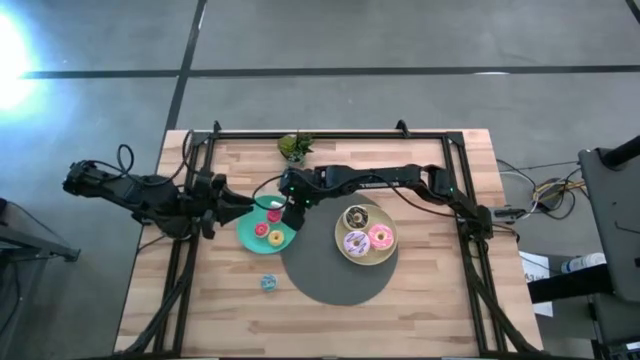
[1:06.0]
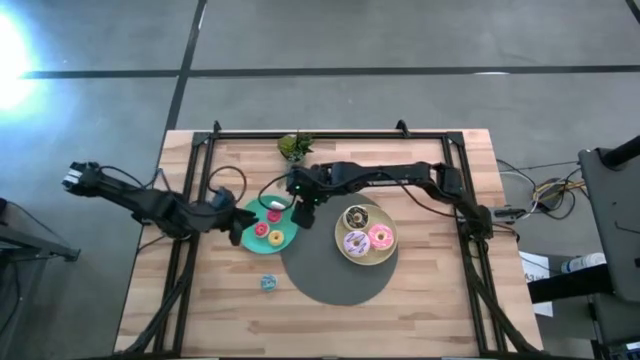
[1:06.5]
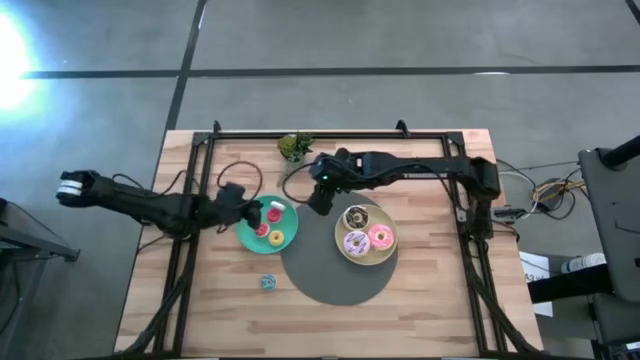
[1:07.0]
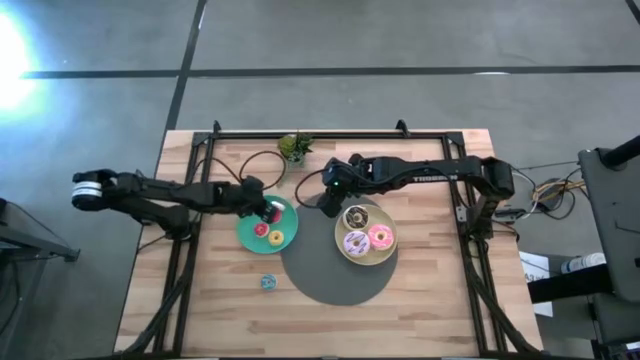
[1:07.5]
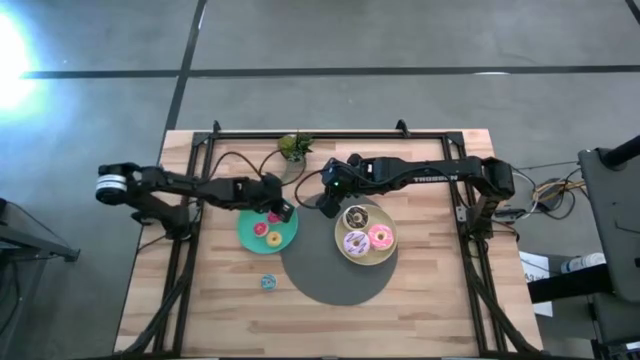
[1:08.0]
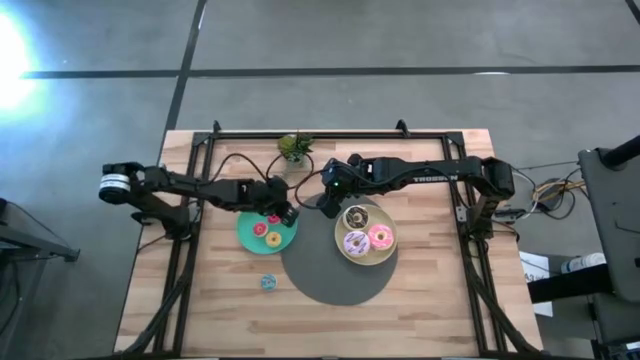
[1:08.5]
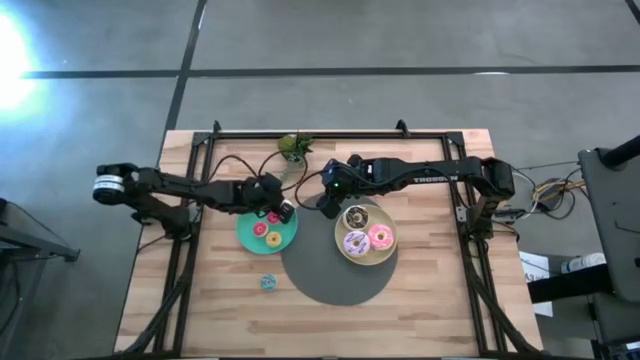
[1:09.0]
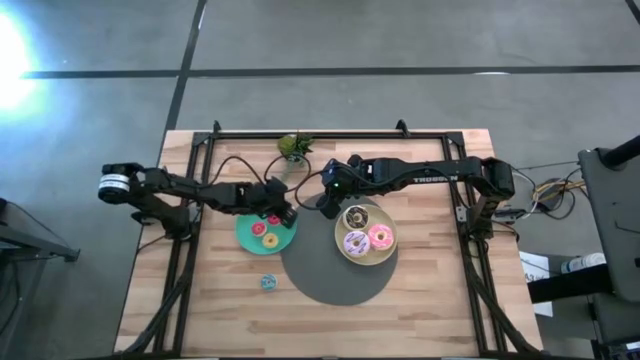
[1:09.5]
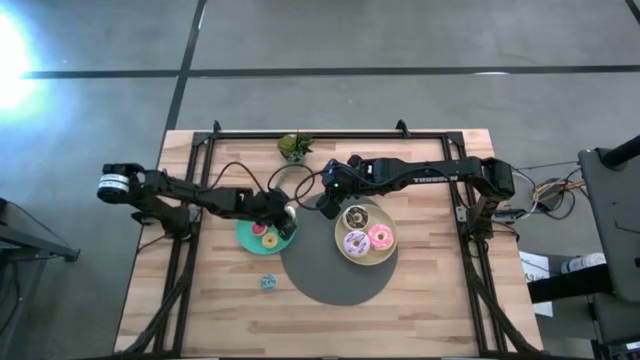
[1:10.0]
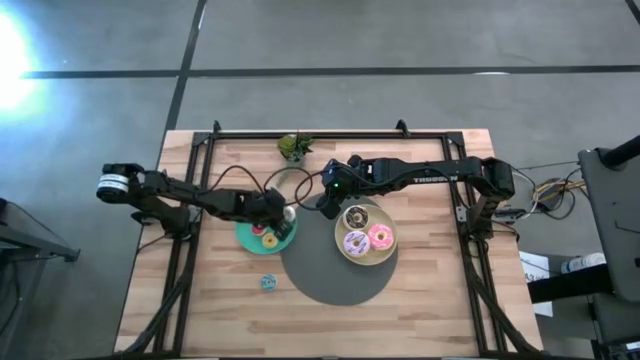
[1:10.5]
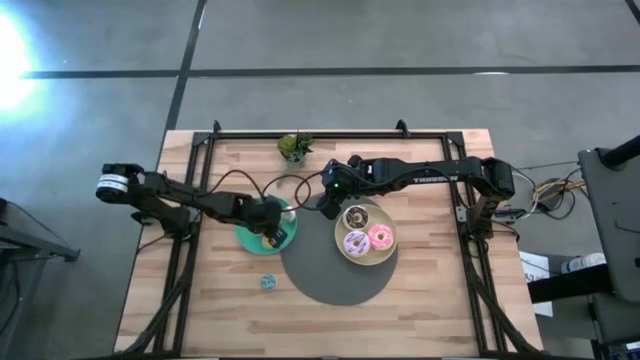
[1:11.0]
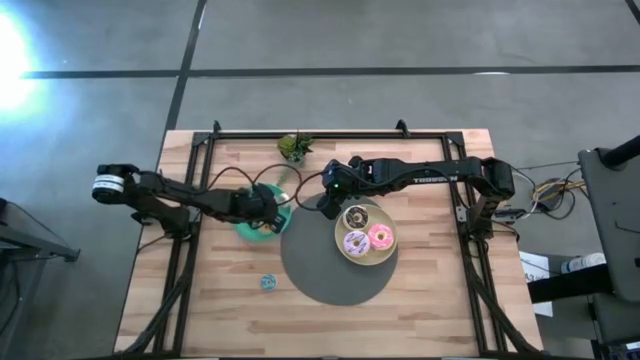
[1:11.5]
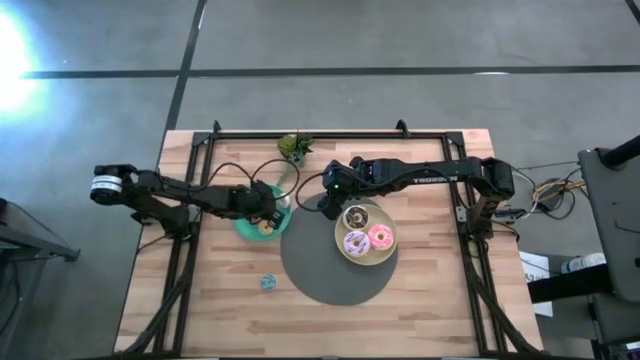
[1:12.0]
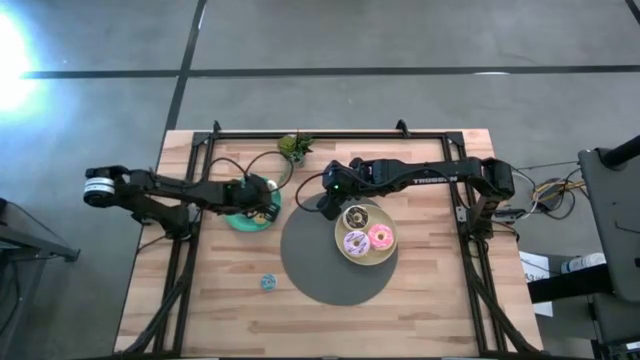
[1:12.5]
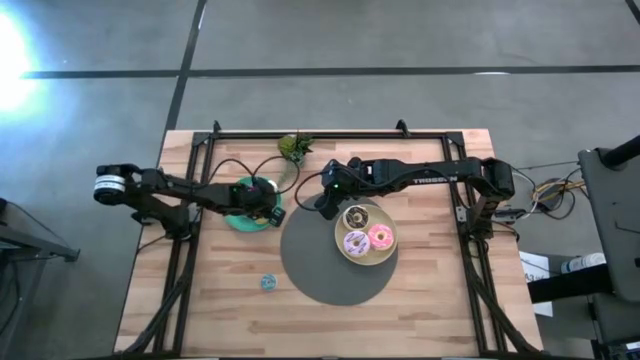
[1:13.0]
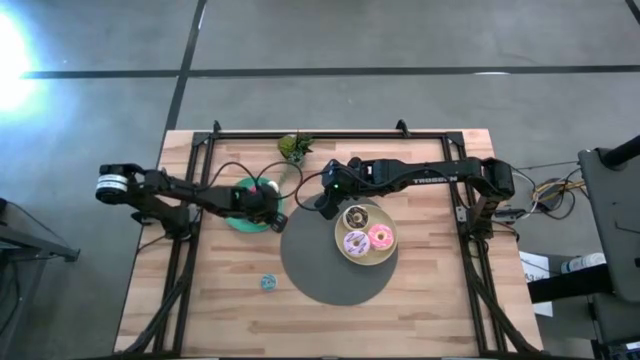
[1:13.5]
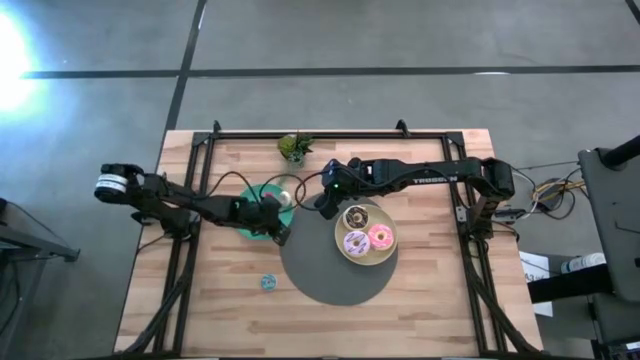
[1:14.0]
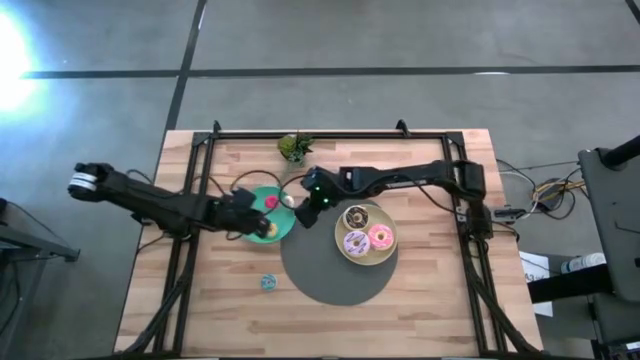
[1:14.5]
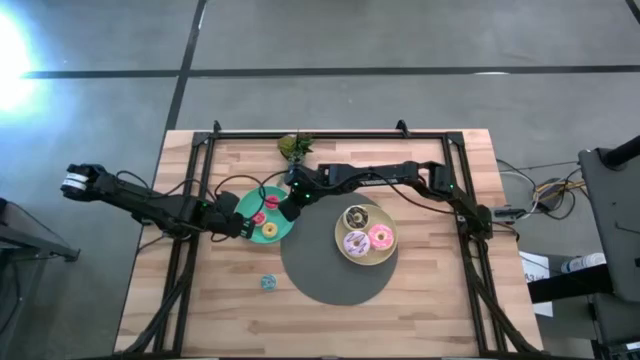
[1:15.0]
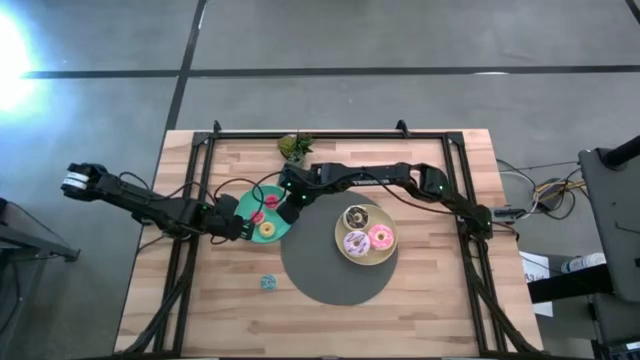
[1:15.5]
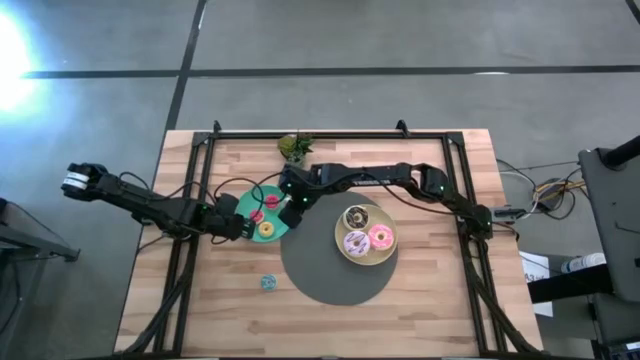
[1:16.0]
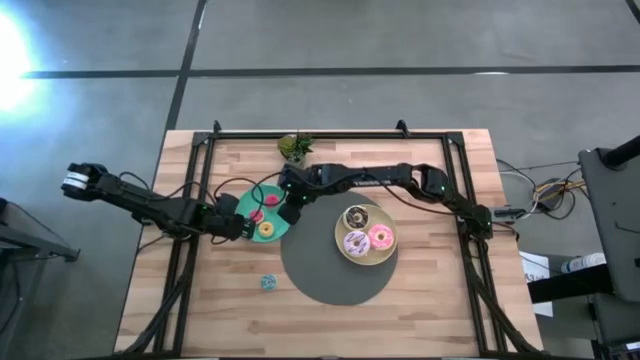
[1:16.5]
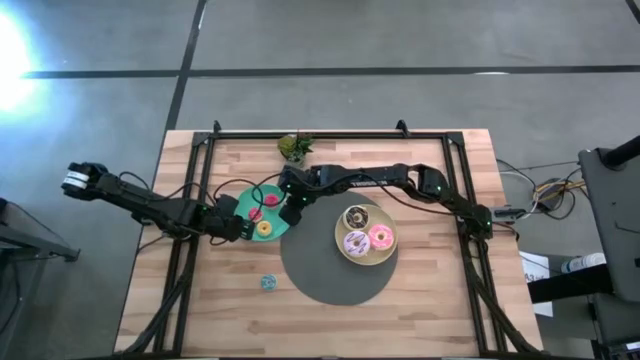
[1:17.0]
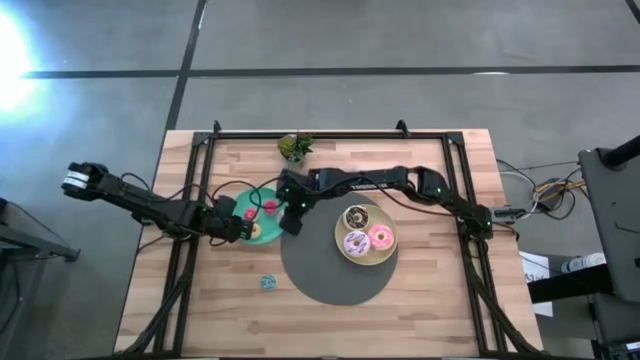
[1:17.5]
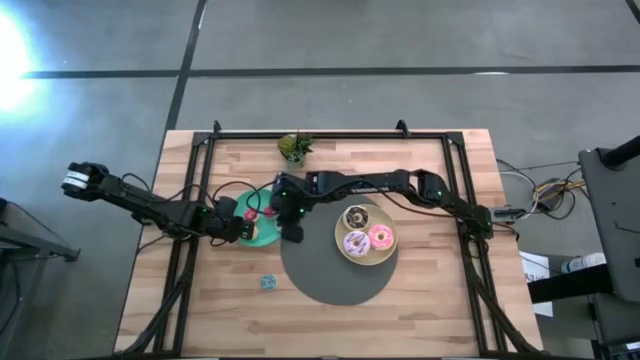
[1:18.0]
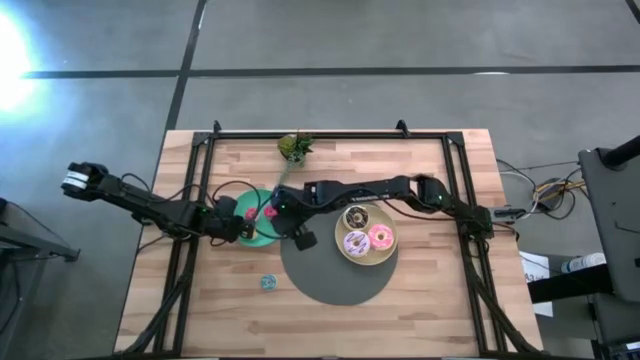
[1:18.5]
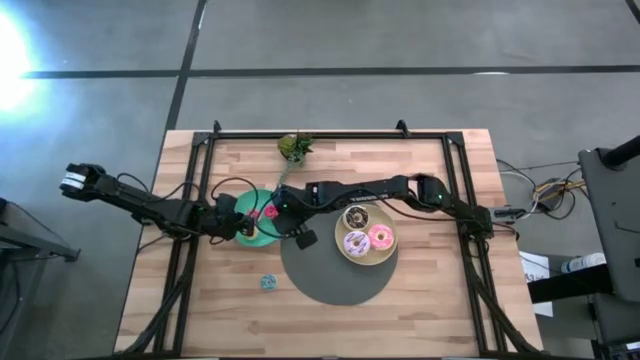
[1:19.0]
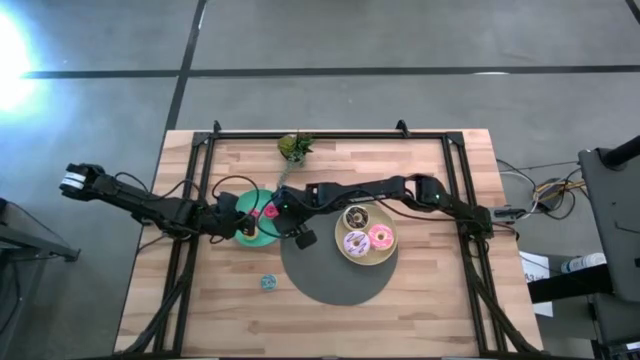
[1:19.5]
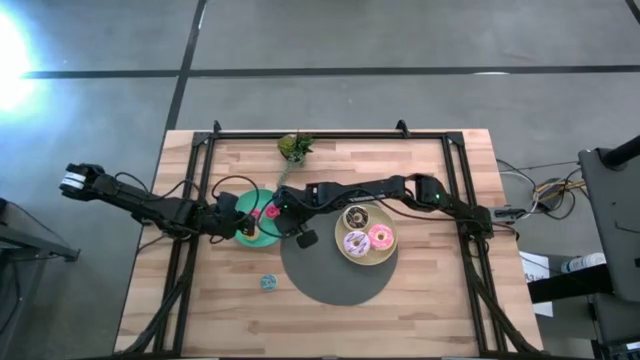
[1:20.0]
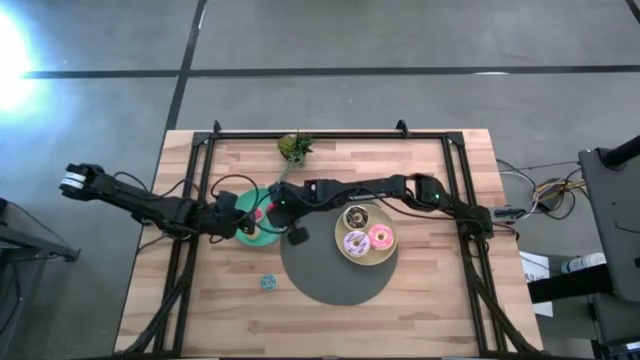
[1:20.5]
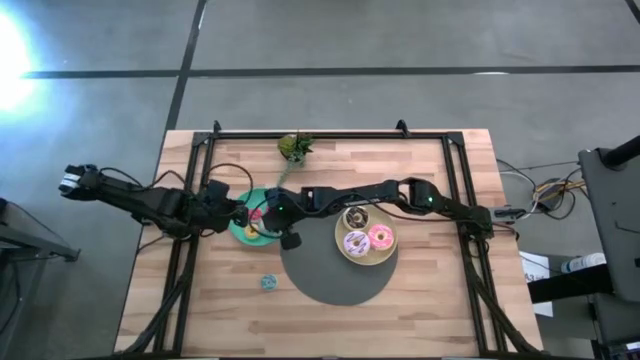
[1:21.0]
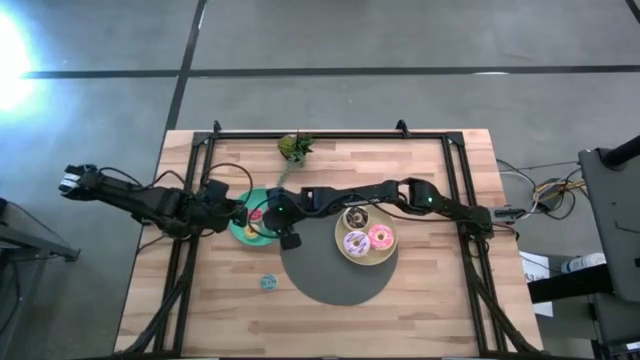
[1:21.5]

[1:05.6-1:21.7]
Task: Pick & Place donuts
Put the white doughnut on the green plate

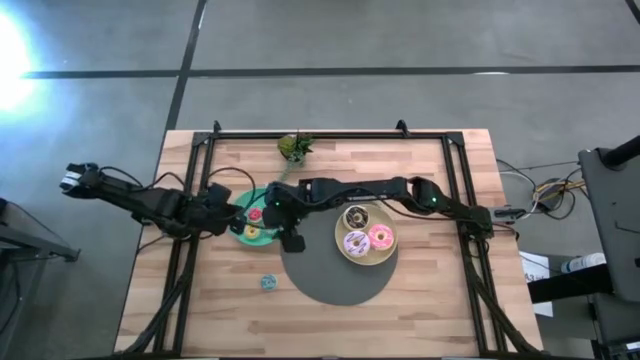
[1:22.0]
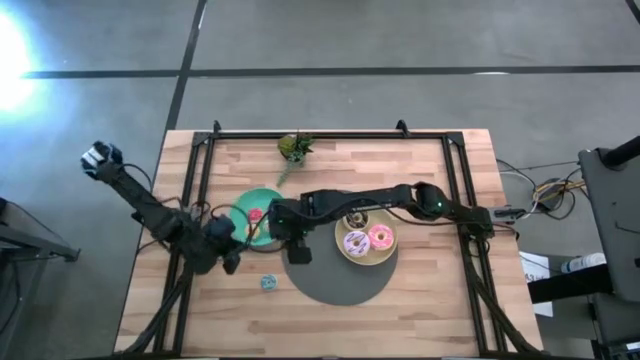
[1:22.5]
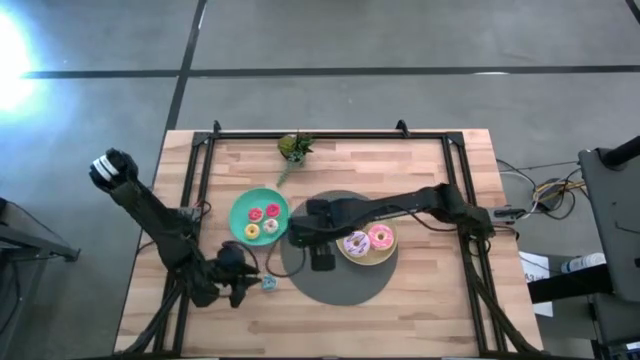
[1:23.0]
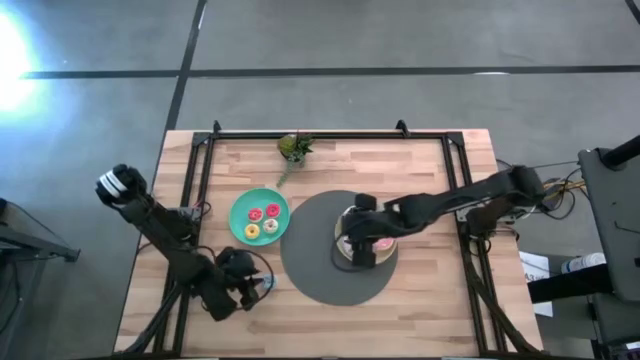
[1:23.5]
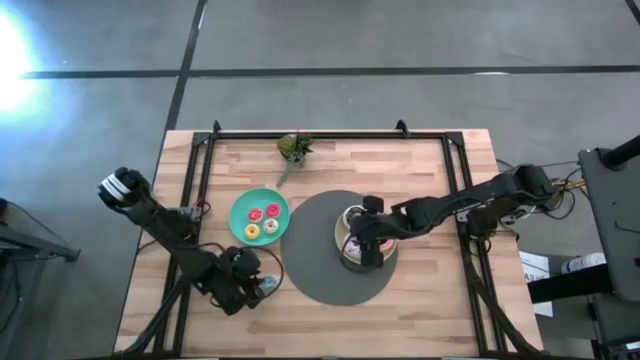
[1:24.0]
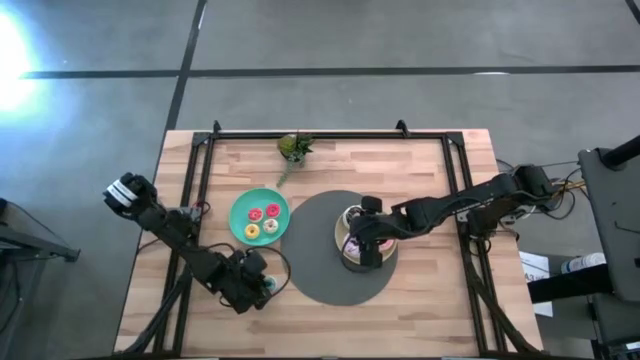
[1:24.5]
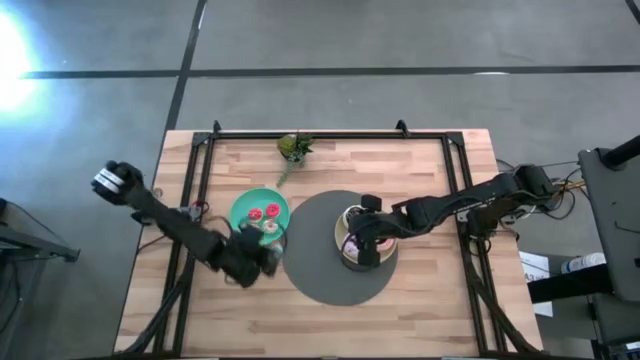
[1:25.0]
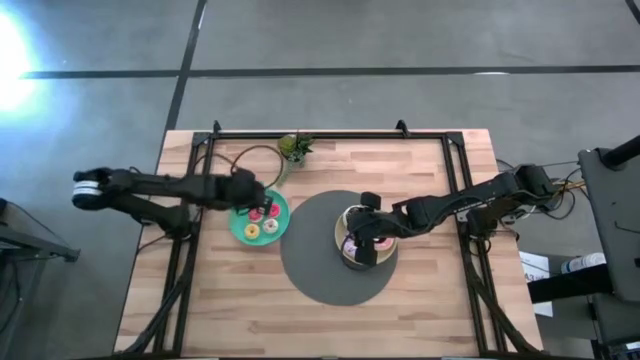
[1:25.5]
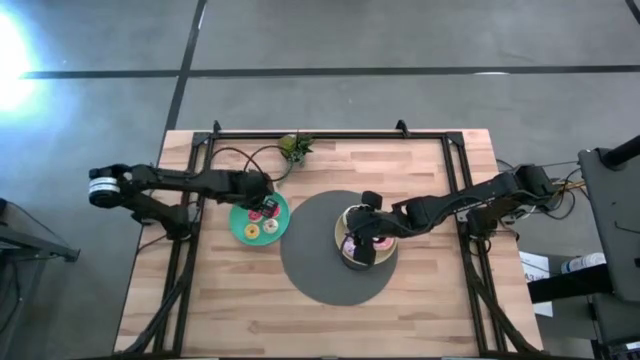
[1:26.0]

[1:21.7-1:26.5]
Put the blue doughnut on the green plate
